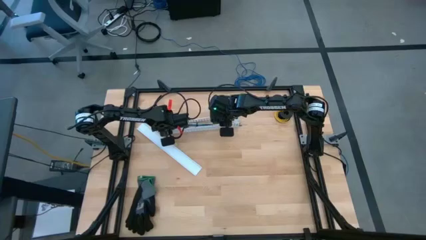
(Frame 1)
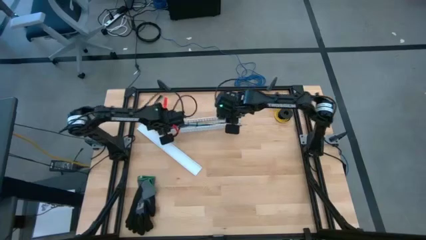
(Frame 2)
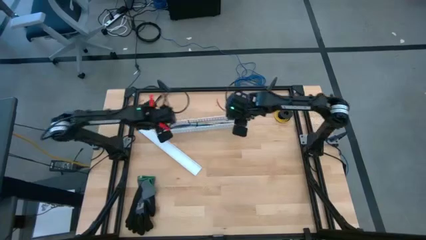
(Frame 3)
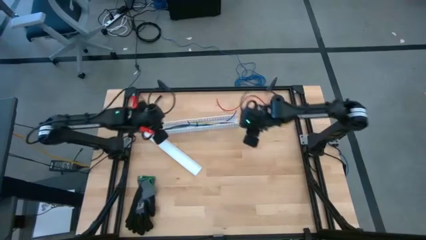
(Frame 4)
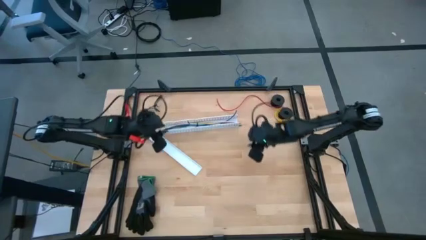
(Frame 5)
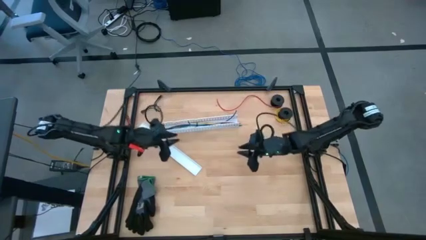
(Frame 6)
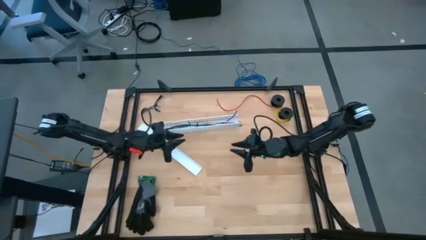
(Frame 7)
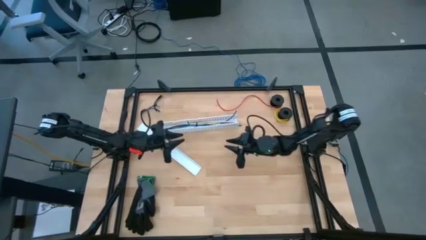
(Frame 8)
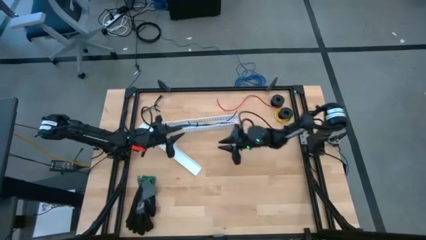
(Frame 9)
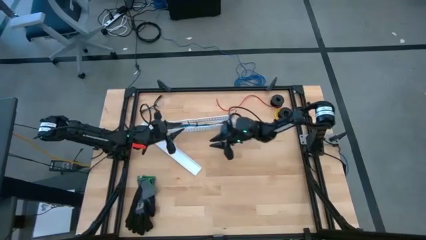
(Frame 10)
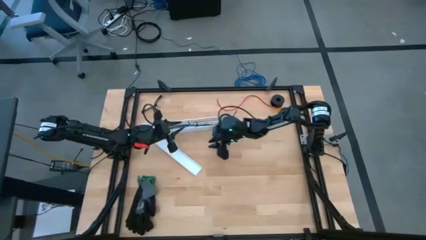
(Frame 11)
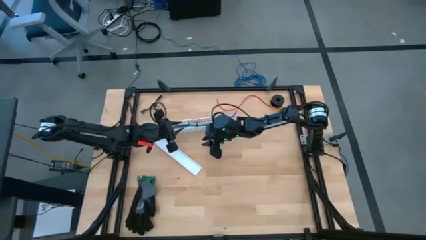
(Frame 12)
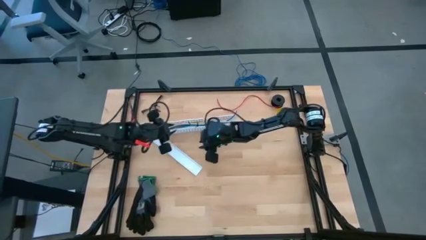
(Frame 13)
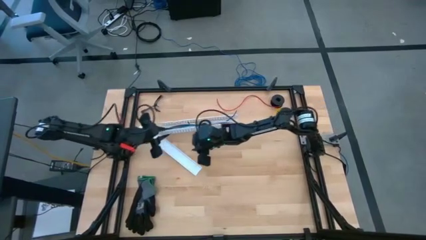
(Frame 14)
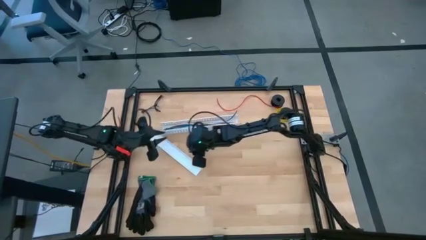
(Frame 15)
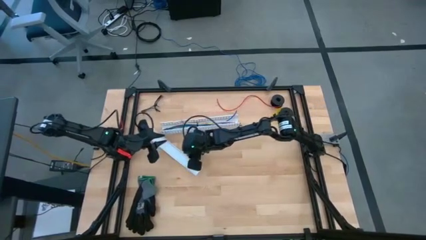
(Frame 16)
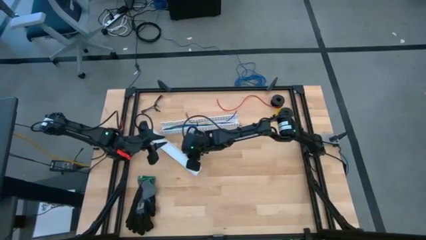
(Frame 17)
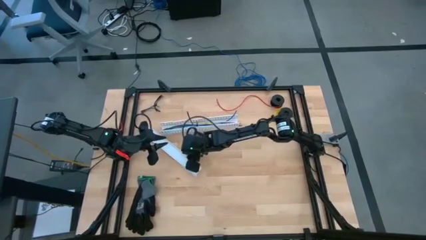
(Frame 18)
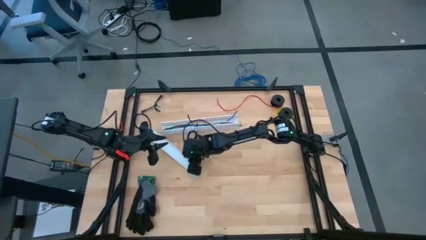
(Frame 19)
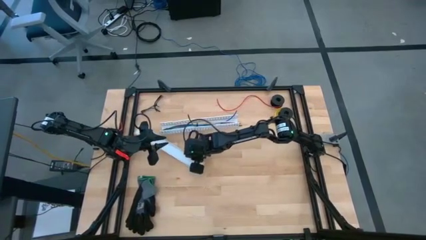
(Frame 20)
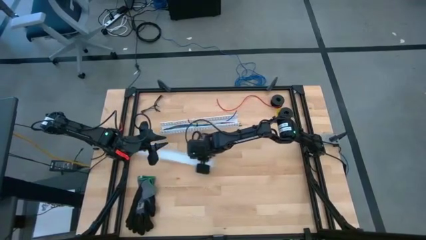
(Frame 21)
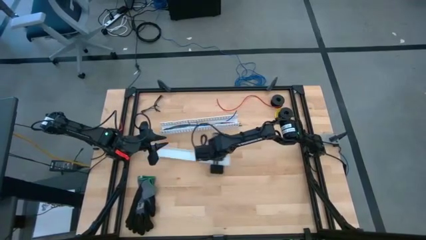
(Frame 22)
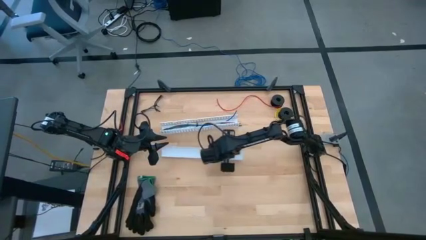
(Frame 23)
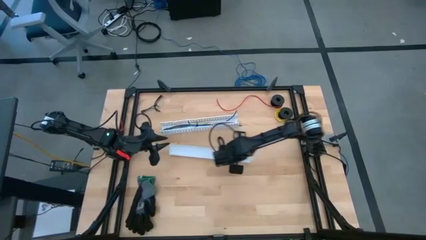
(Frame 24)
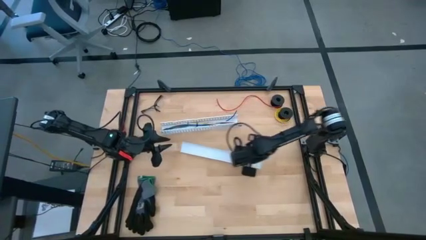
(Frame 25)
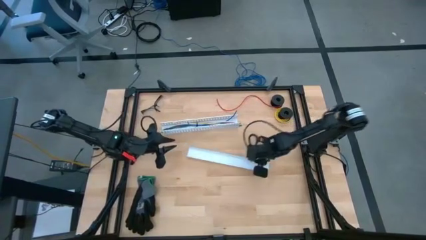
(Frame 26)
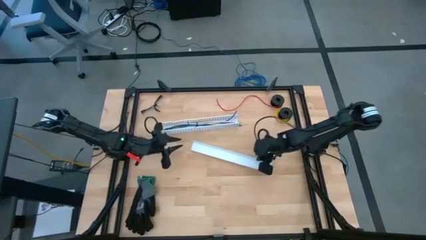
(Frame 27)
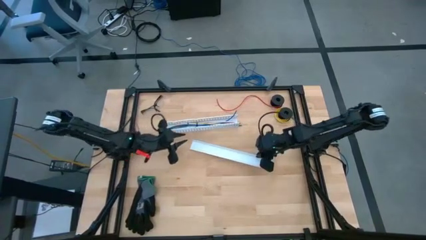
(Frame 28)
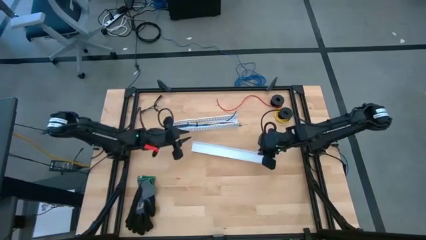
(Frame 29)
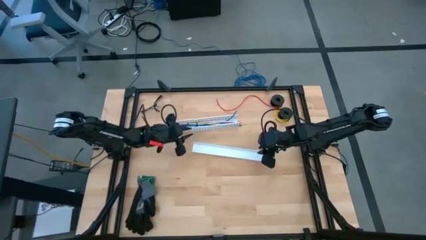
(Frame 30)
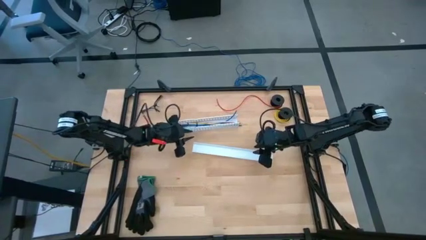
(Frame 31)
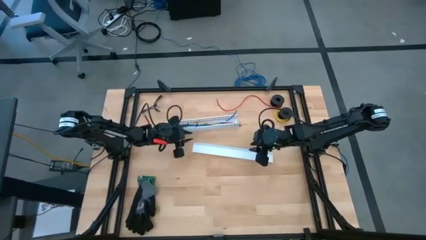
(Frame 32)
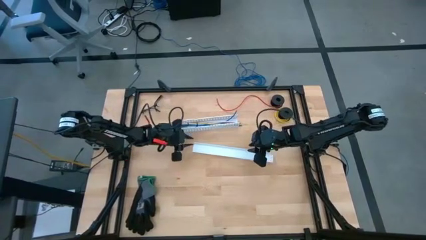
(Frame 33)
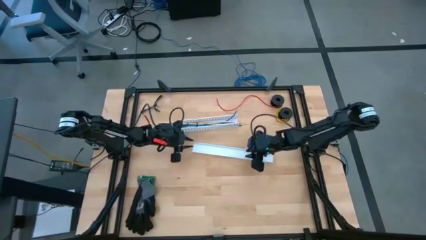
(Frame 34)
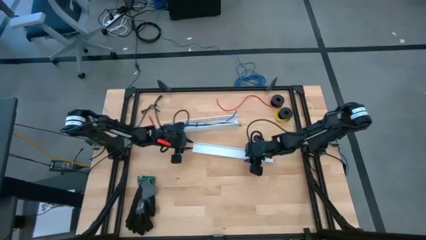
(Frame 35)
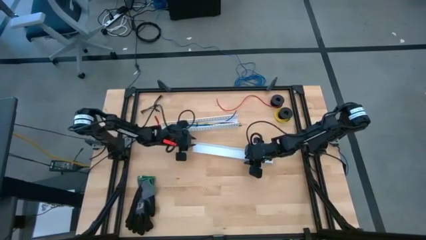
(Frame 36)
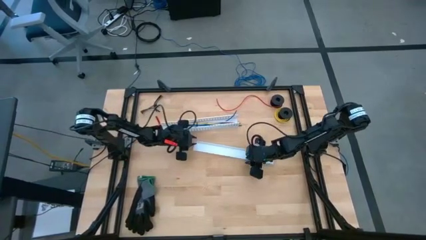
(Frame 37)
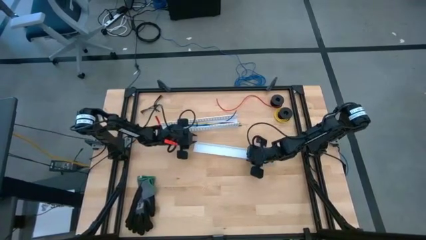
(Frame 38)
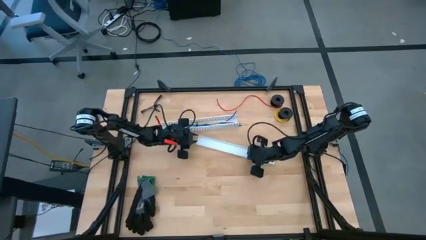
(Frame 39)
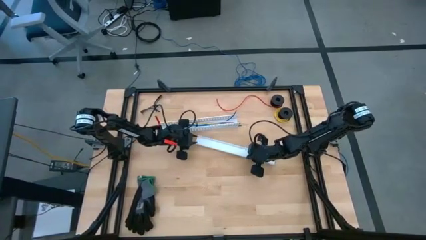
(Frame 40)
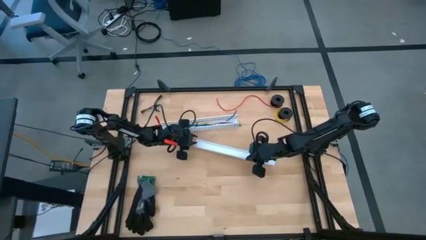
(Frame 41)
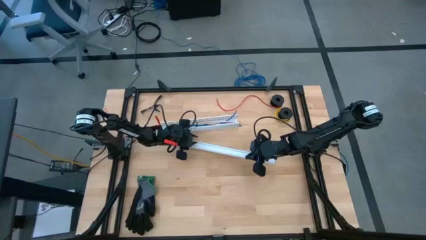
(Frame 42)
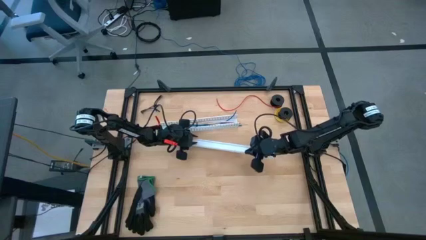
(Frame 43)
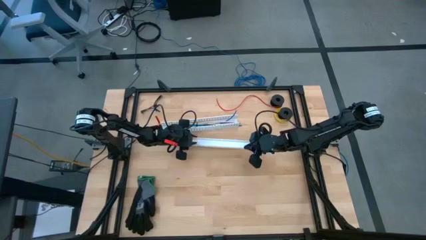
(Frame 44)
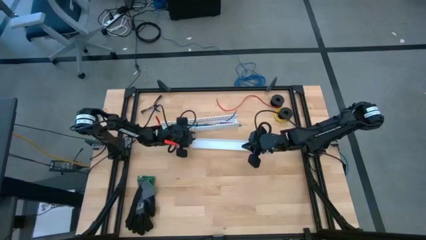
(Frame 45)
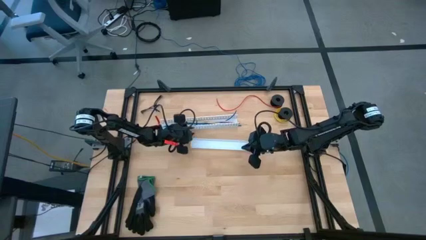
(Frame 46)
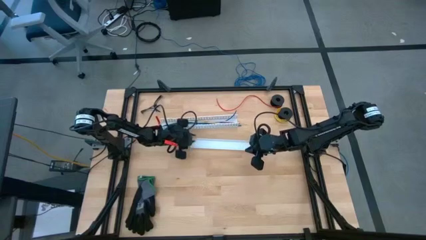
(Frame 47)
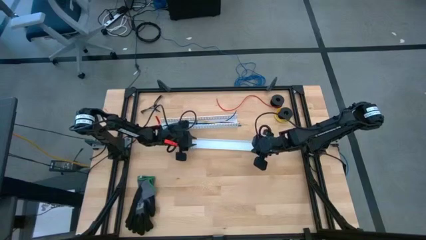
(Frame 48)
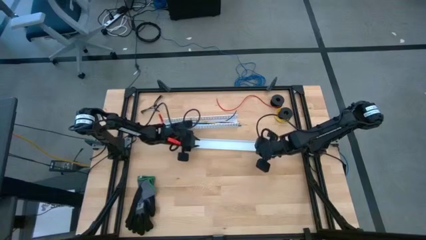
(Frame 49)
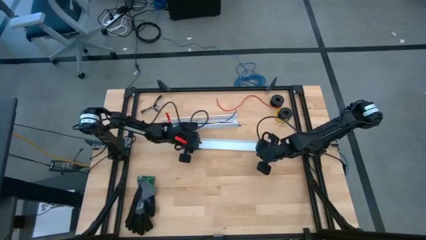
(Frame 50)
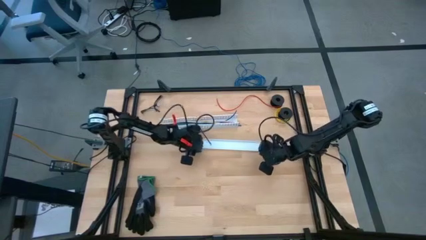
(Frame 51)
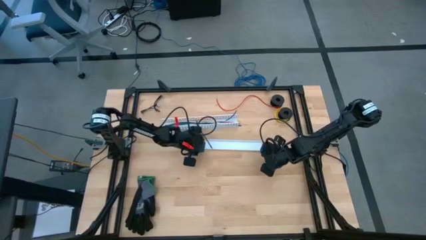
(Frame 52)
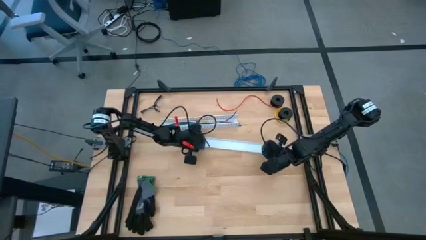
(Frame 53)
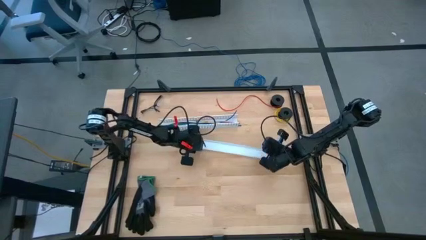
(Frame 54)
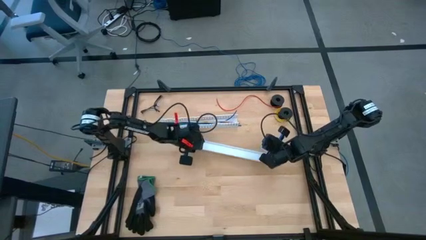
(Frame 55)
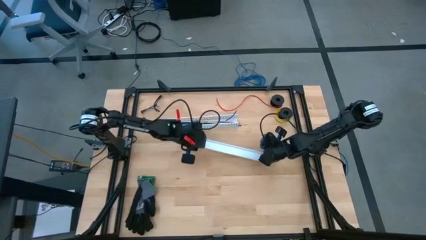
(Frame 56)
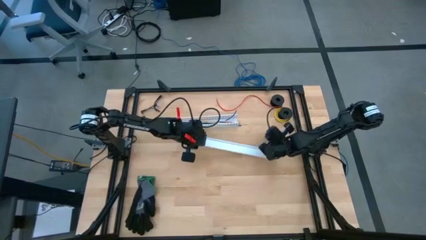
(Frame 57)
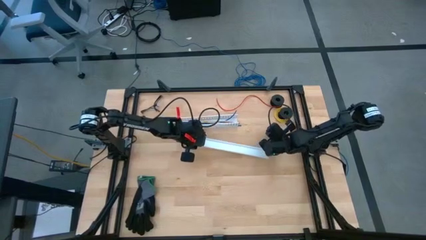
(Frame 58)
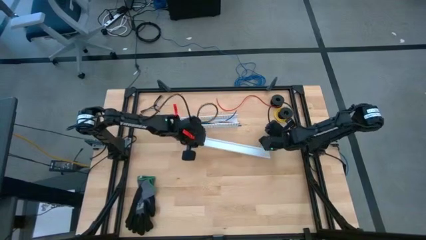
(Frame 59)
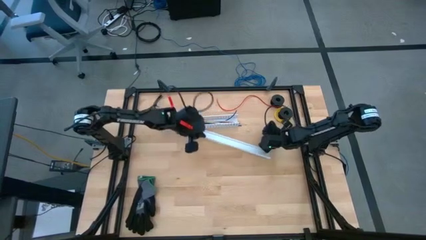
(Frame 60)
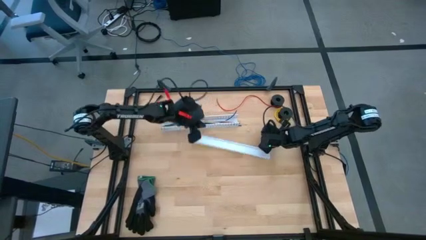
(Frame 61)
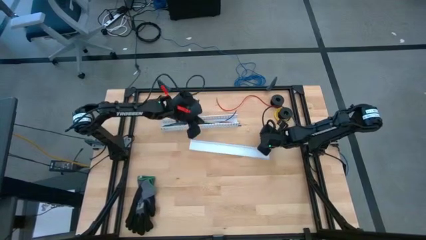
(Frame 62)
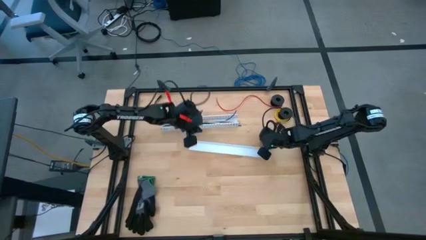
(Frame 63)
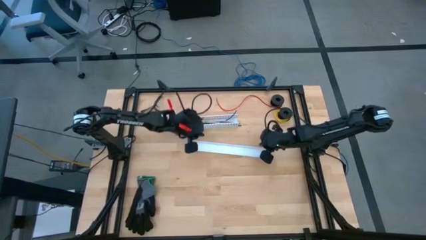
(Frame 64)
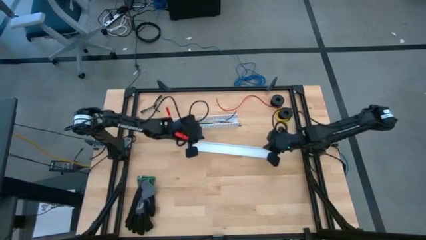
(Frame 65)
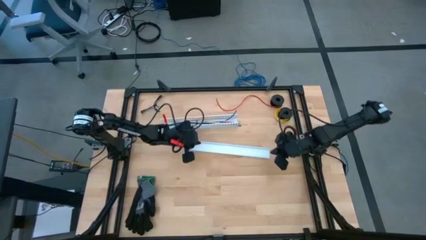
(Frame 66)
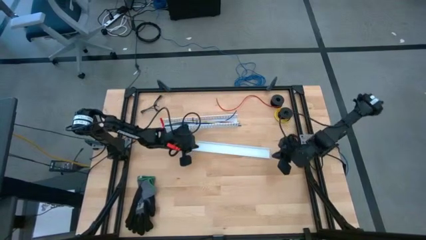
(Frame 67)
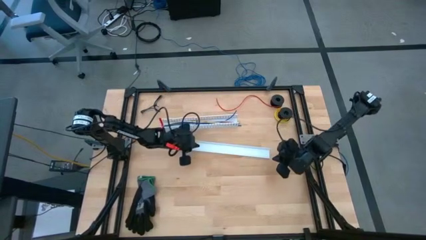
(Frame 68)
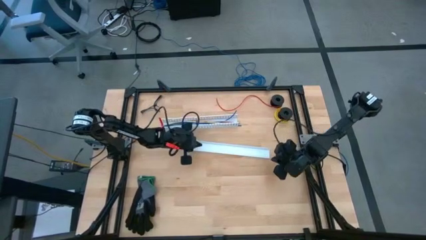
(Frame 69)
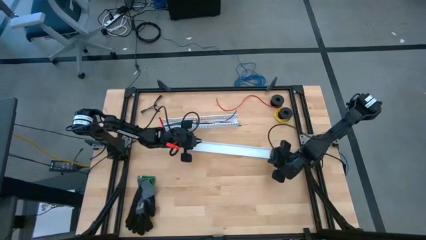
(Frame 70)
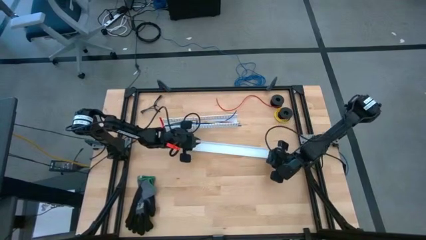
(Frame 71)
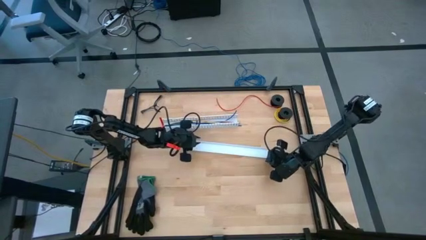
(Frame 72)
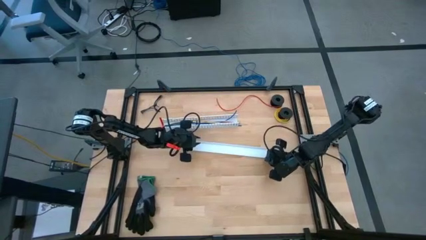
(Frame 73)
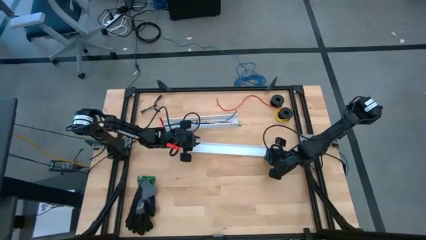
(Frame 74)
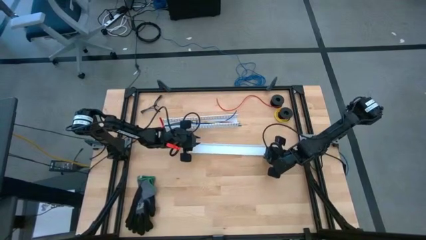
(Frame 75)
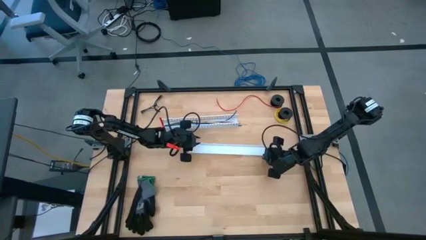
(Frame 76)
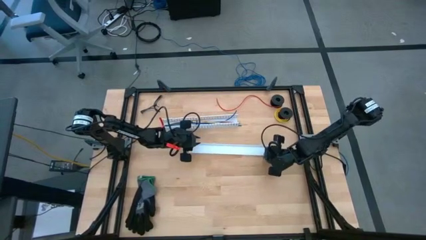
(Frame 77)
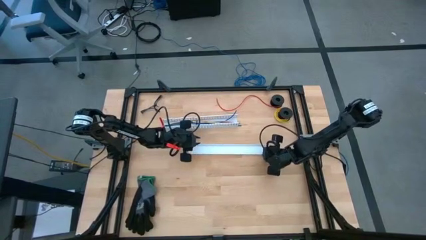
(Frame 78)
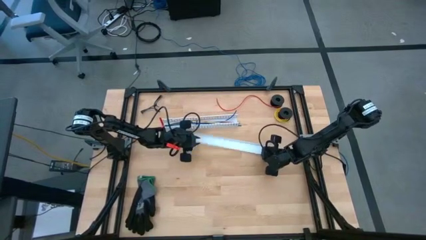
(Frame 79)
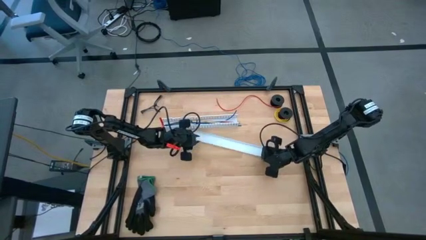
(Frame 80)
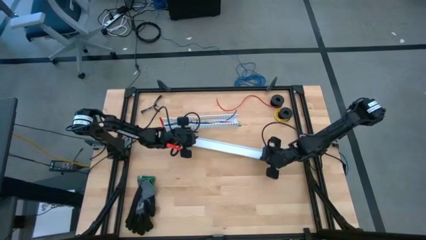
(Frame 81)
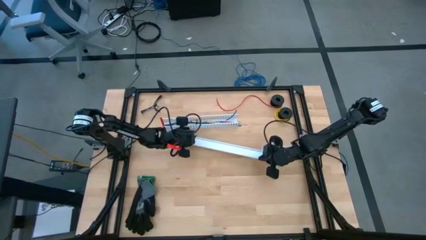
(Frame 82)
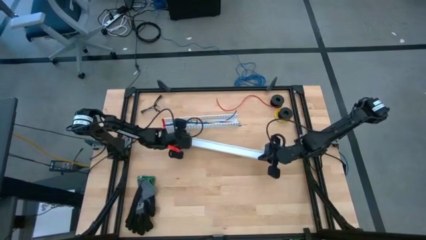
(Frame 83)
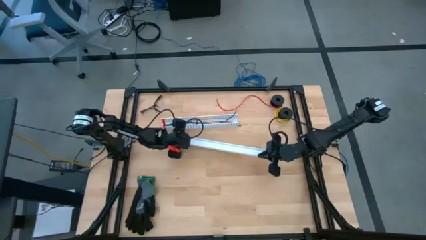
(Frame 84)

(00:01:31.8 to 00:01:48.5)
Task: Ziptie cables
Close the white cable duct
